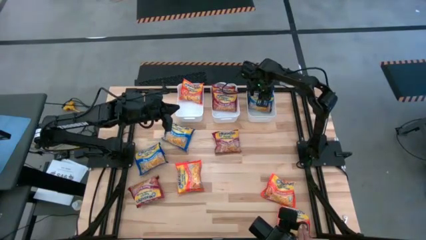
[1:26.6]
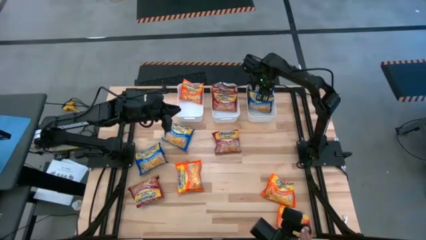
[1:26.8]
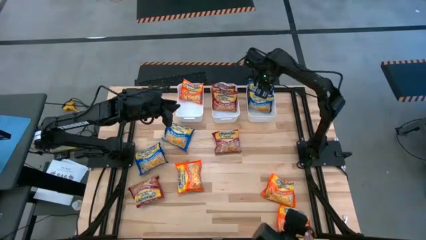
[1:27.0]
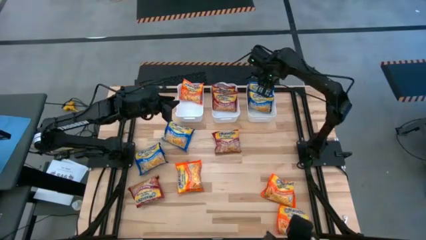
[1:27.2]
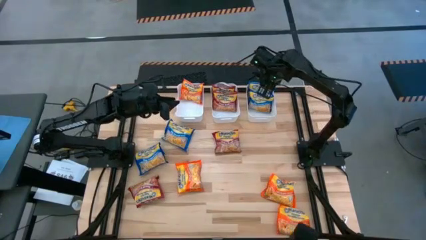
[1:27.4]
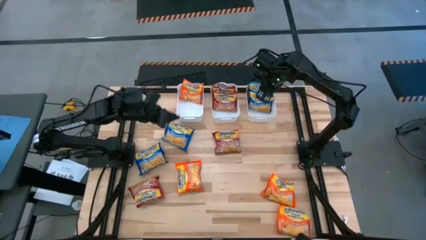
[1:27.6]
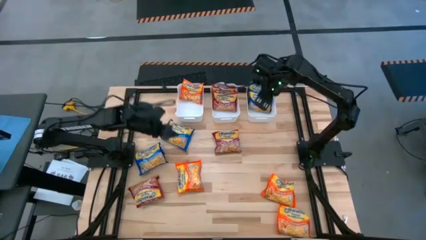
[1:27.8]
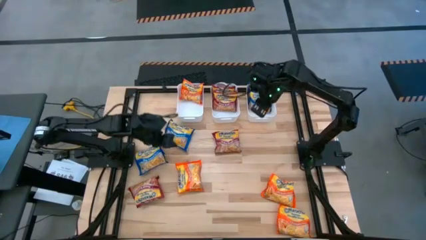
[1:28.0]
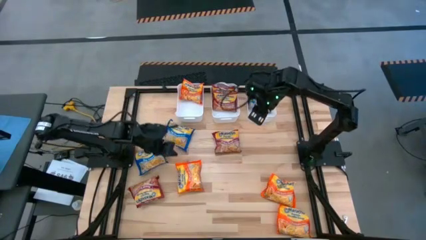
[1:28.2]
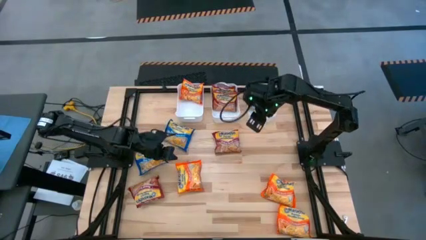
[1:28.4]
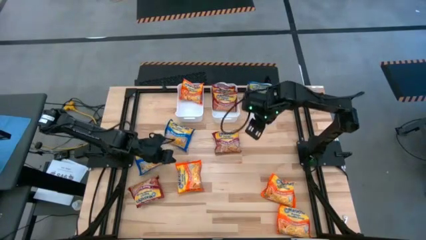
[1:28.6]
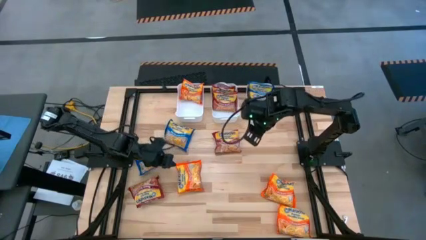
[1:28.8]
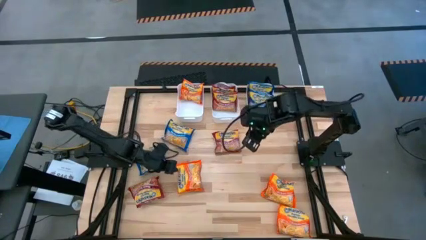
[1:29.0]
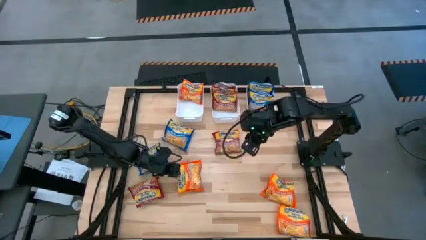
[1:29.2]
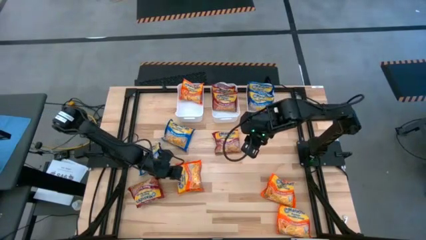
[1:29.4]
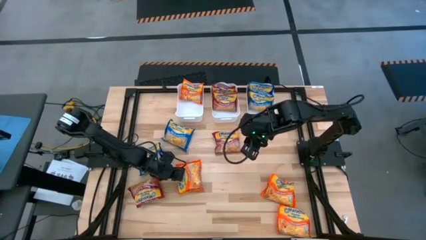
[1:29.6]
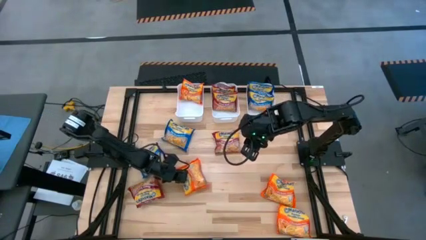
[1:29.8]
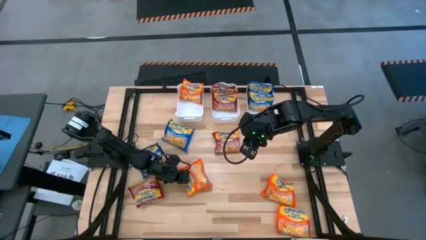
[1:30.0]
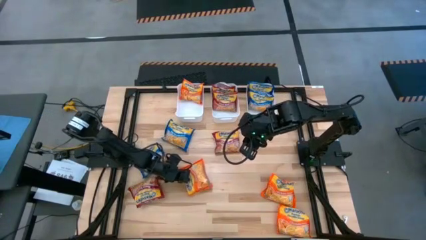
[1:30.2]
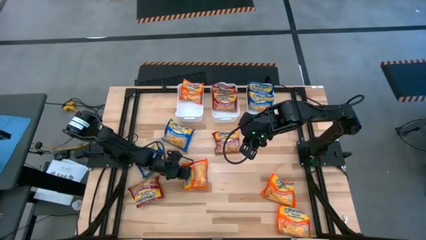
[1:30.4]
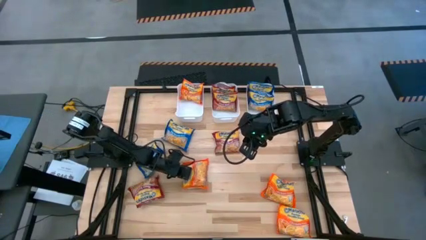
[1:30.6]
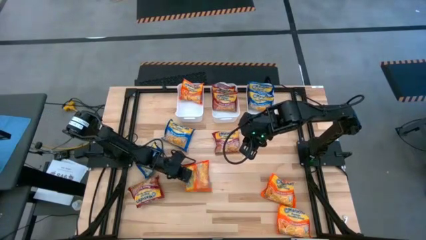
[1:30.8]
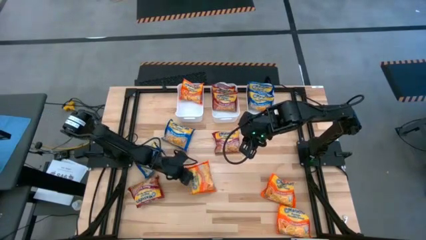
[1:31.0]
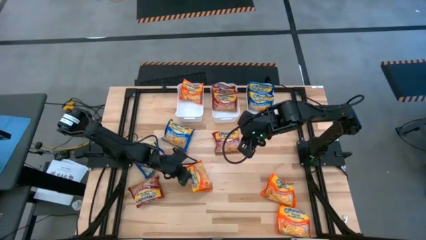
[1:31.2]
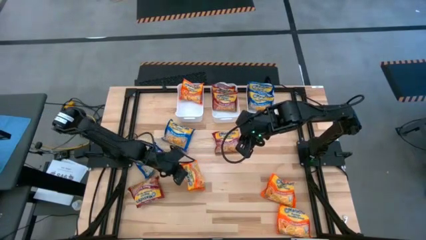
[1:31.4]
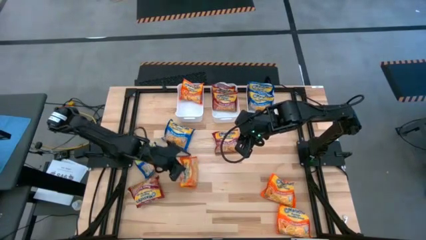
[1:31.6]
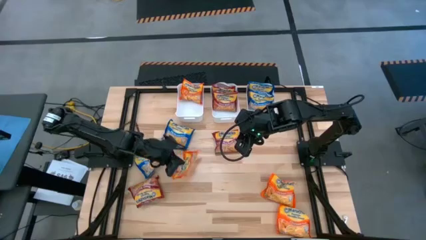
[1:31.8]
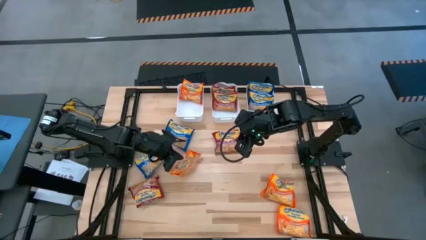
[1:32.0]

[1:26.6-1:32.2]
Task: Sort Maruchan noodles
Put the orange noodle pack into the left white bin

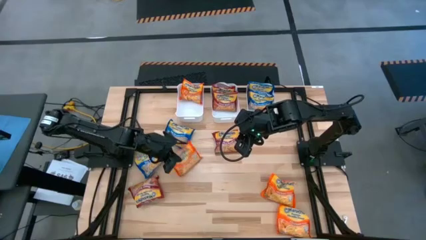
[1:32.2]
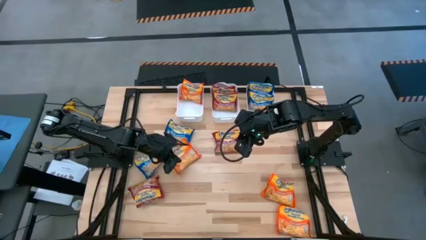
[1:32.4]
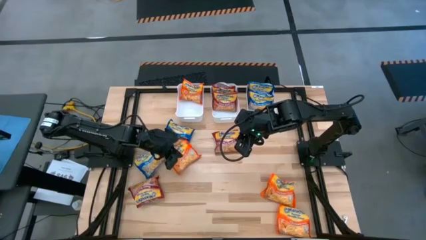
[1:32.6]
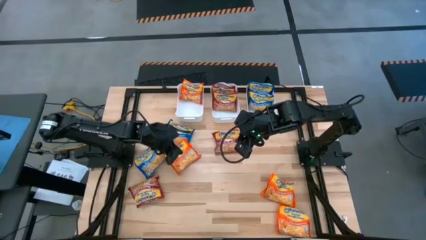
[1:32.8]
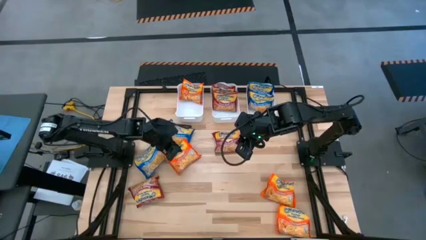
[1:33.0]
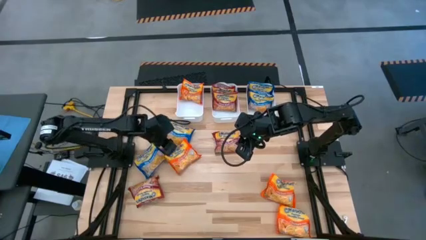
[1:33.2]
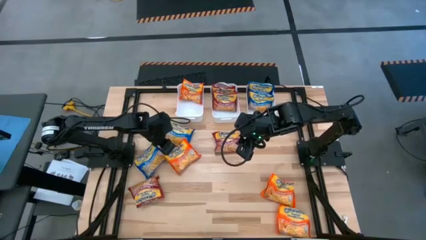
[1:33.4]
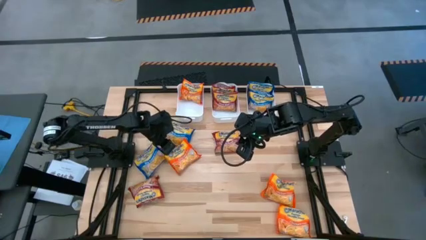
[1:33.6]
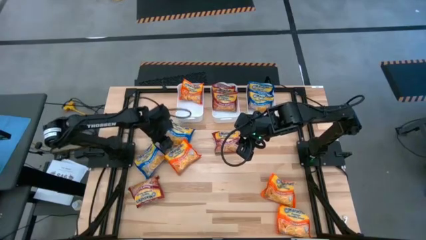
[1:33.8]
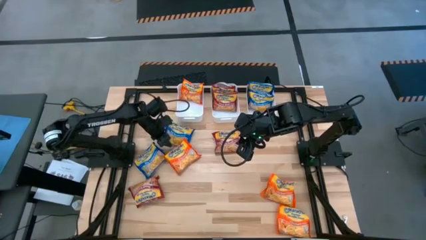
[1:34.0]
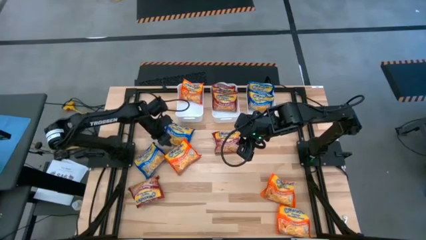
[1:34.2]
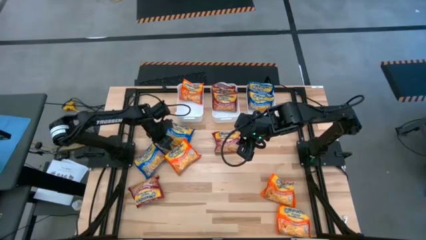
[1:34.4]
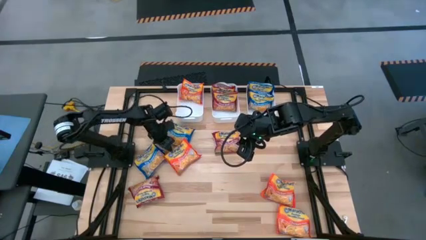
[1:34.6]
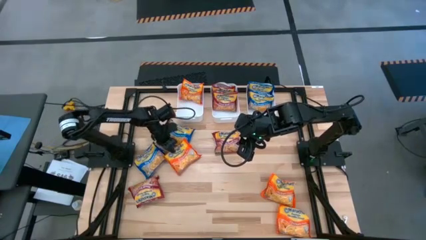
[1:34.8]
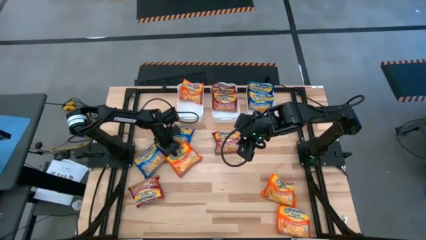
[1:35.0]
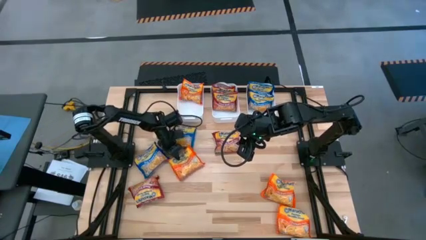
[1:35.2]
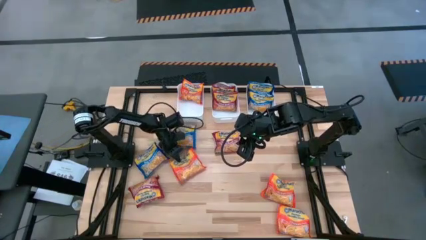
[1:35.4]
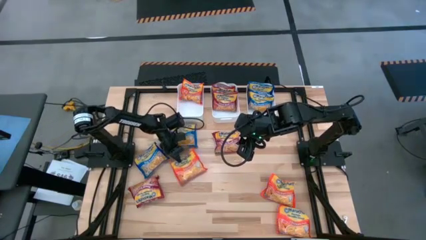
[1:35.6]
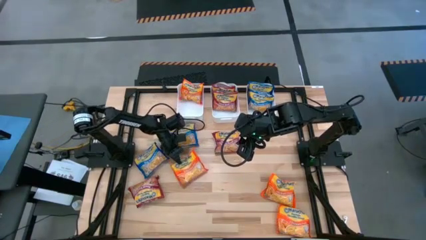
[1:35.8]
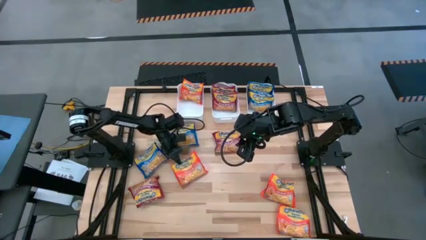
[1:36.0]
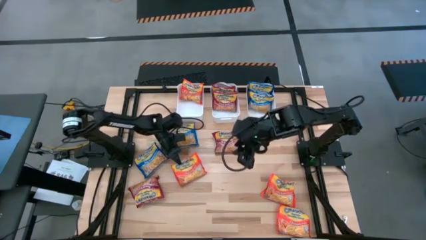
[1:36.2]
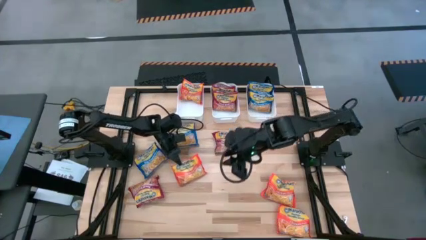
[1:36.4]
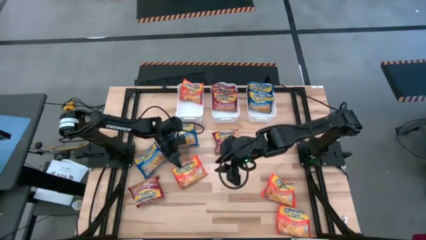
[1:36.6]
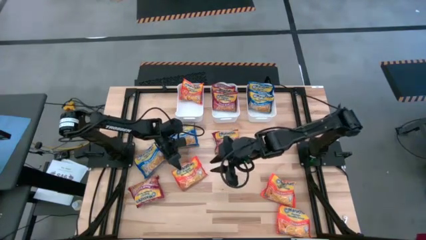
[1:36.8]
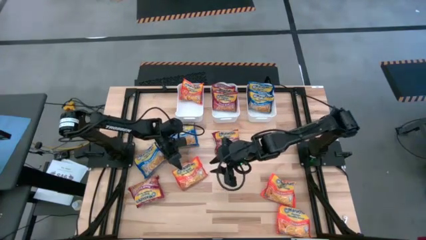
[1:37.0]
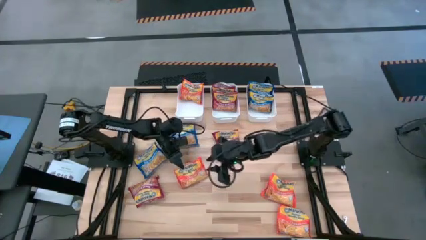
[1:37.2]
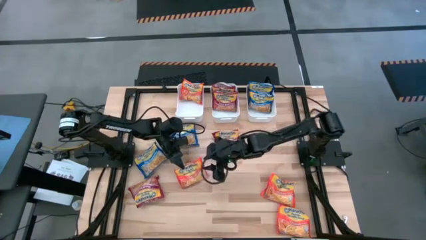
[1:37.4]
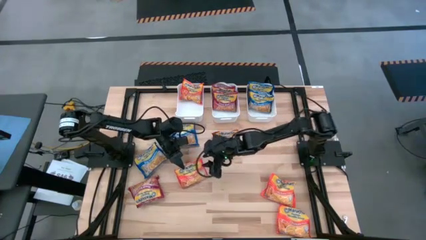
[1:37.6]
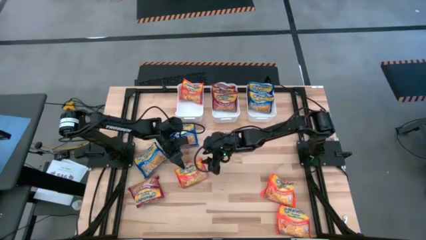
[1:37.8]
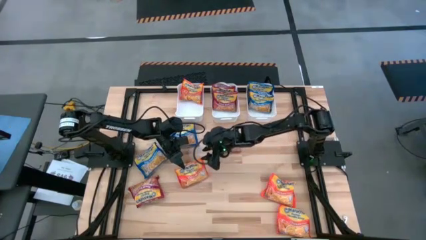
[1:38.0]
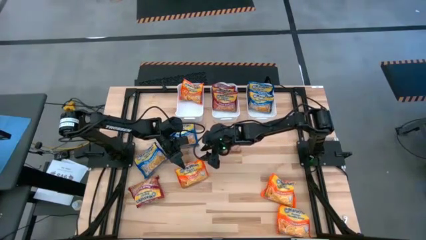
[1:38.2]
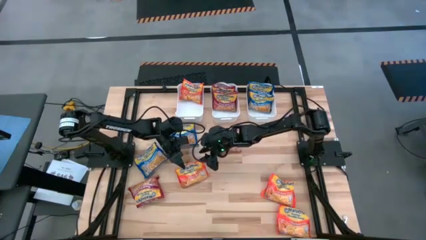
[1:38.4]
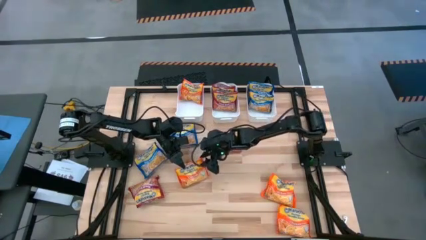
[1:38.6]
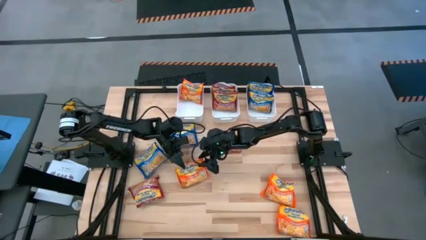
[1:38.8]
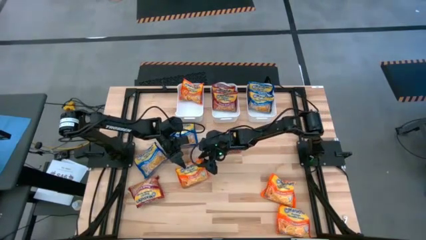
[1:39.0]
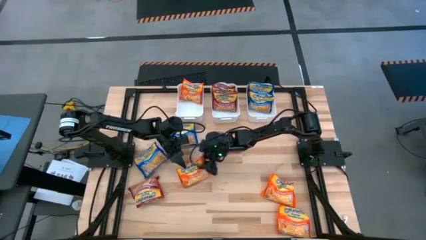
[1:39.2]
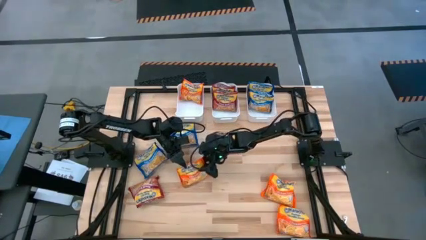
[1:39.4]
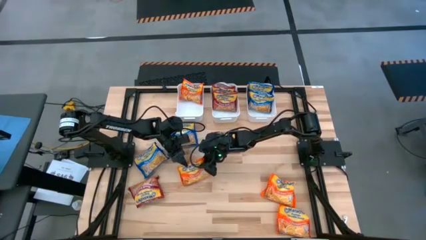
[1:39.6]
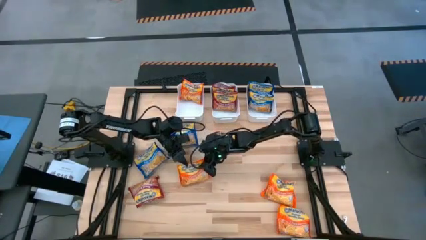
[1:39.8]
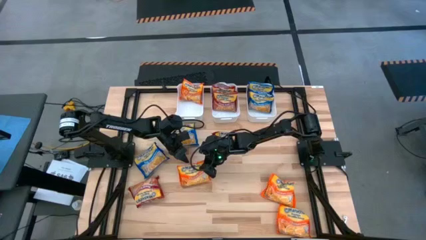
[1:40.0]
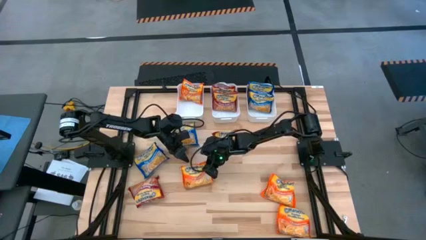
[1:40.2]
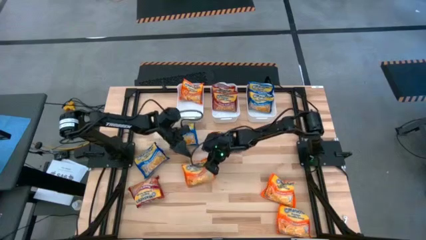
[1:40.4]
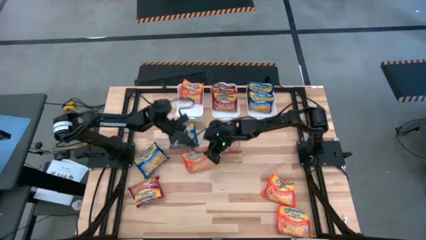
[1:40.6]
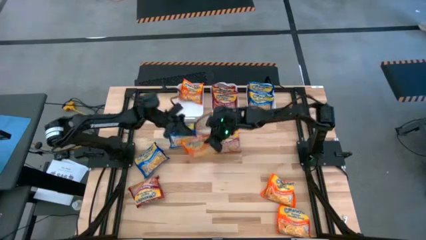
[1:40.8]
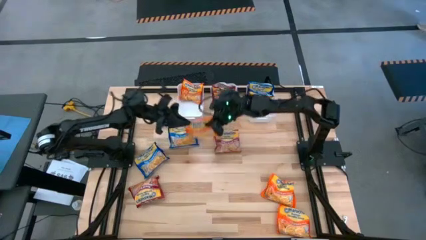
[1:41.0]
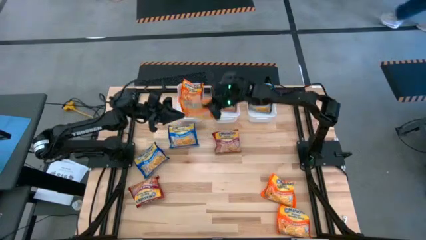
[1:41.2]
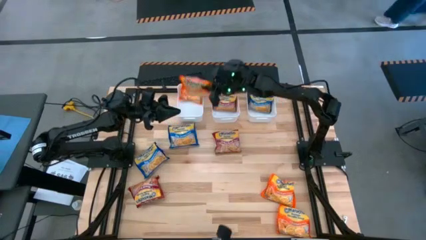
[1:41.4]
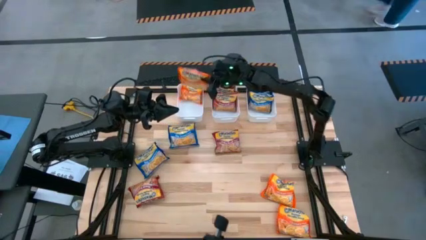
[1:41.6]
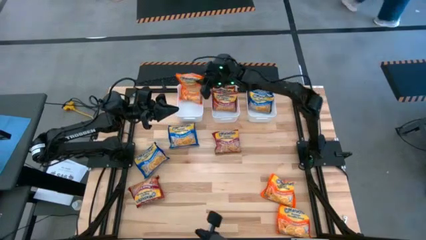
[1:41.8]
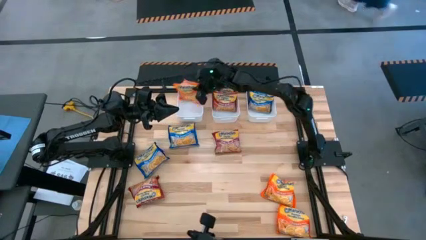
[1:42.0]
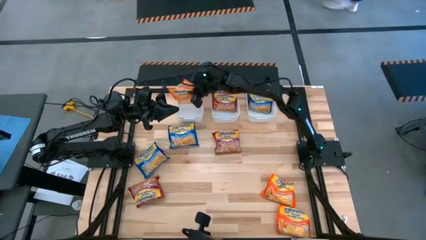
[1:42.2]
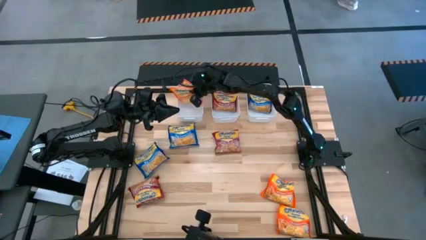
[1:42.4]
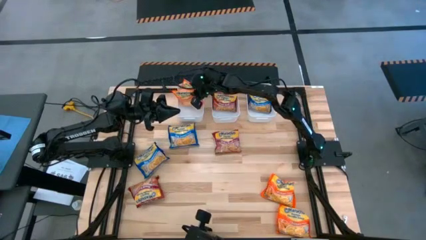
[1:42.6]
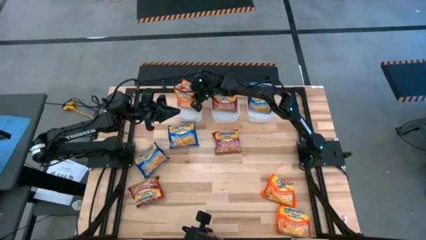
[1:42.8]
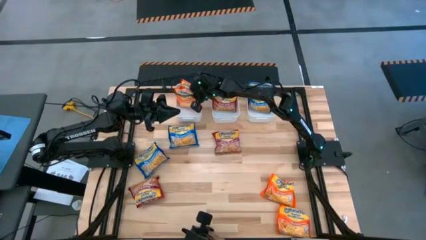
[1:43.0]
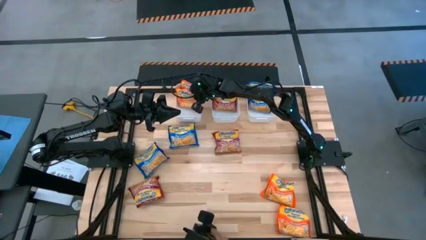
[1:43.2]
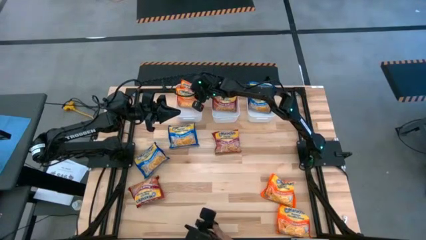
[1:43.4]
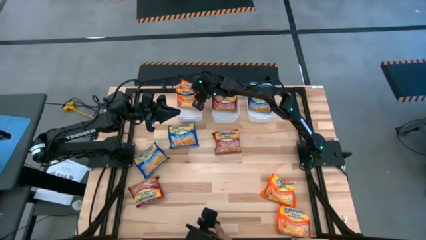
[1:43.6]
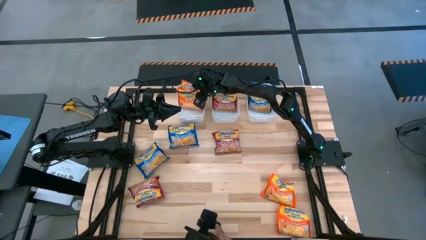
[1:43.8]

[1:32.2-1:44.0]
Put the orange noodle pack into the left white bin
